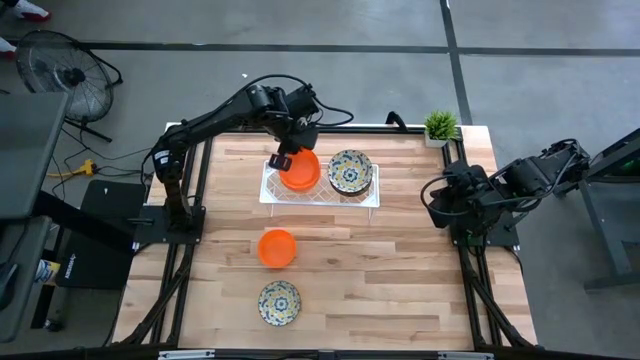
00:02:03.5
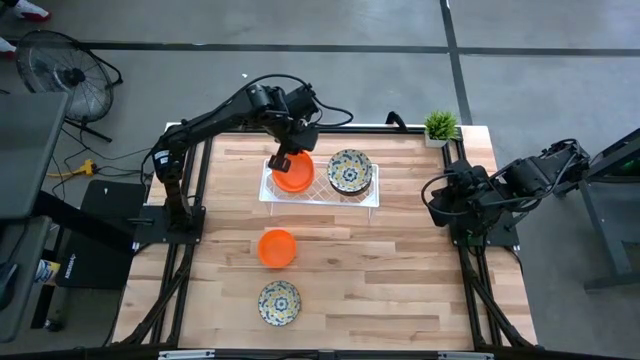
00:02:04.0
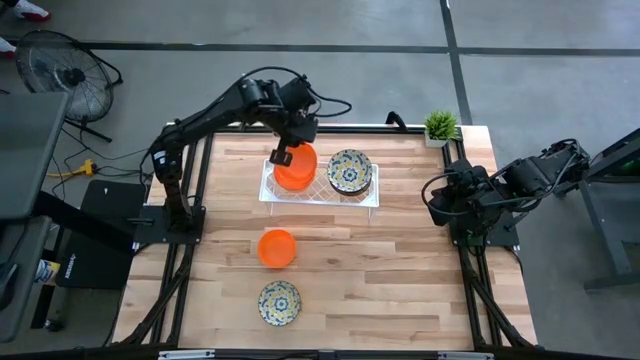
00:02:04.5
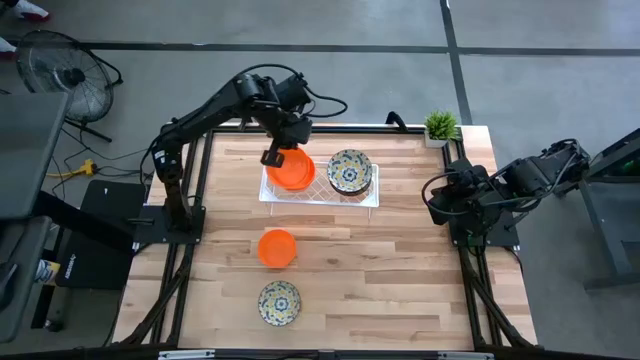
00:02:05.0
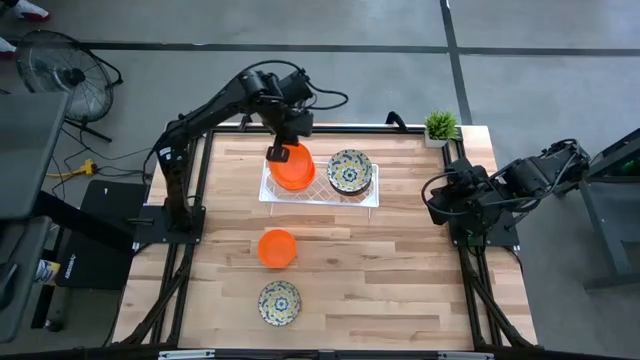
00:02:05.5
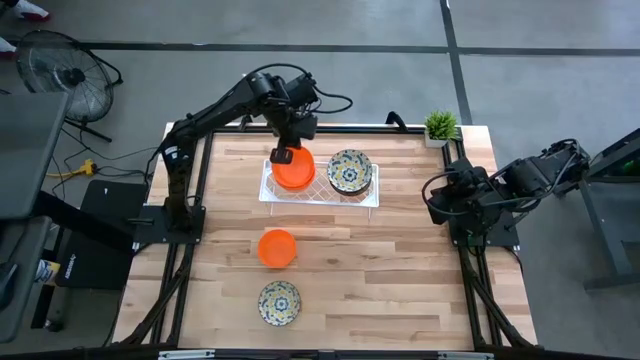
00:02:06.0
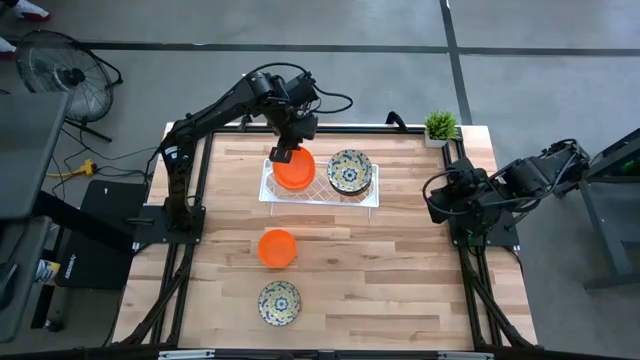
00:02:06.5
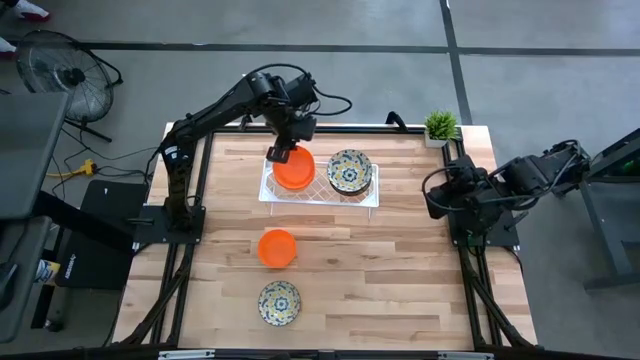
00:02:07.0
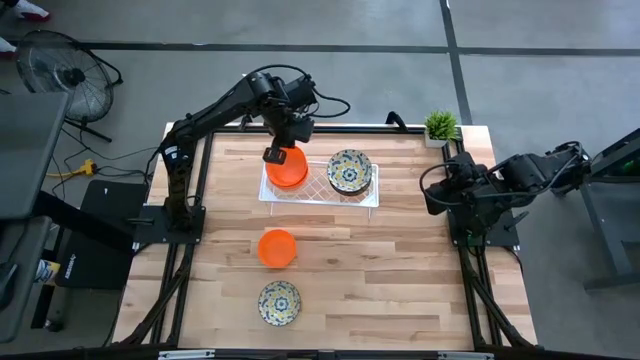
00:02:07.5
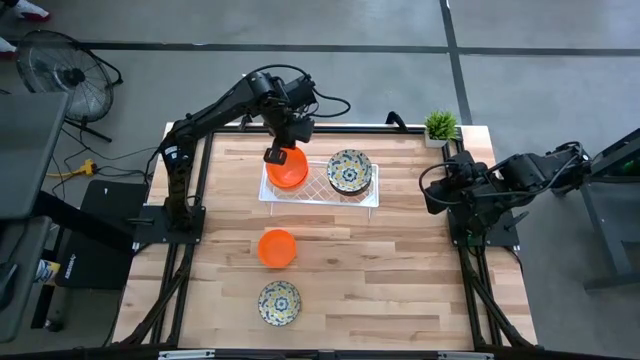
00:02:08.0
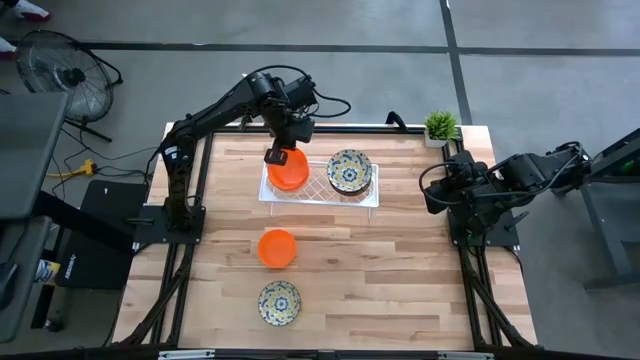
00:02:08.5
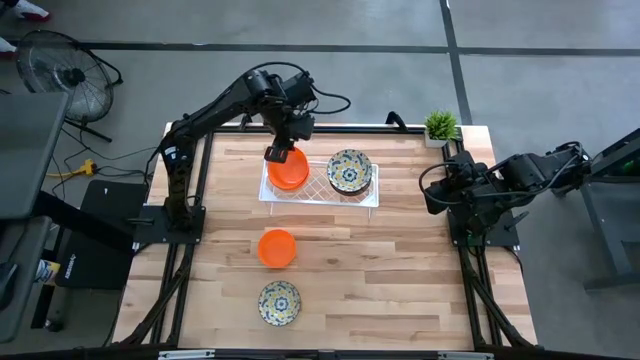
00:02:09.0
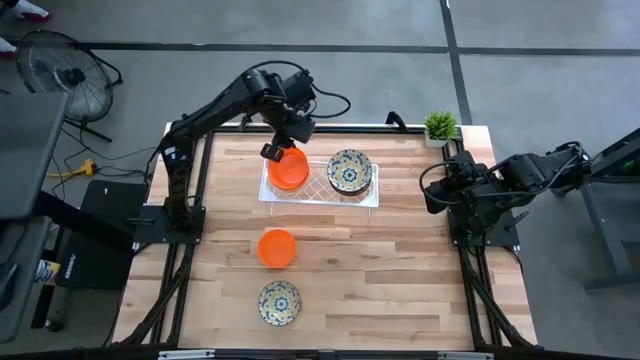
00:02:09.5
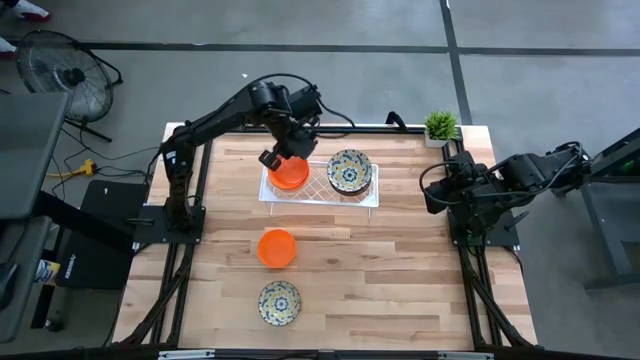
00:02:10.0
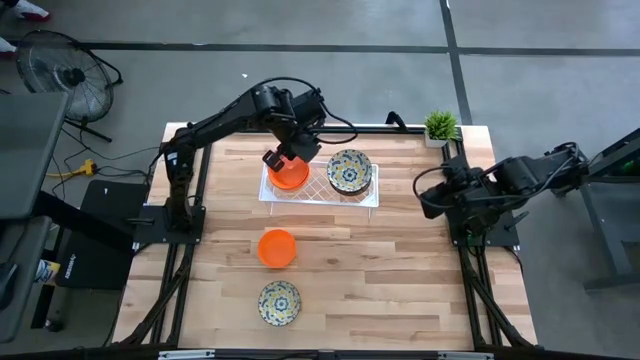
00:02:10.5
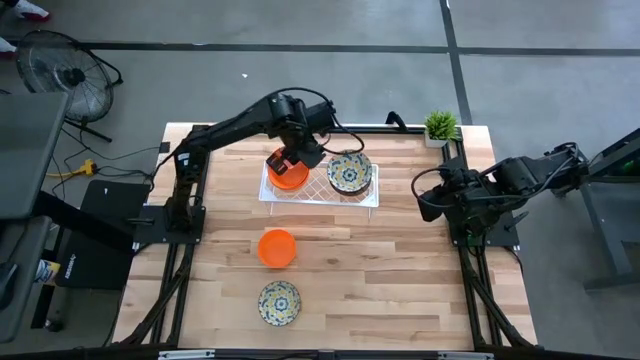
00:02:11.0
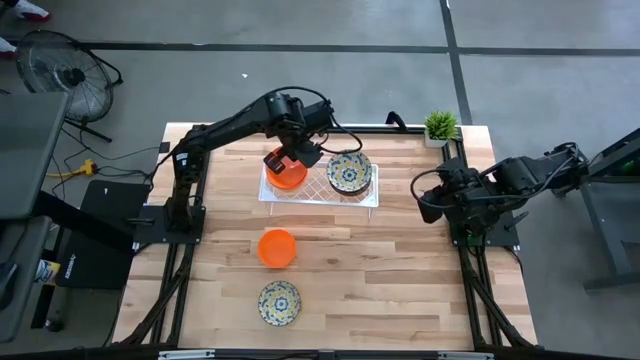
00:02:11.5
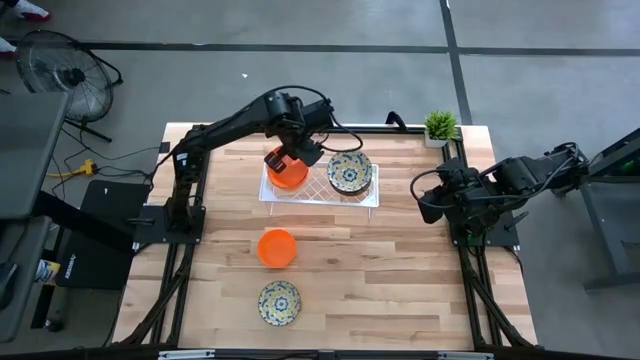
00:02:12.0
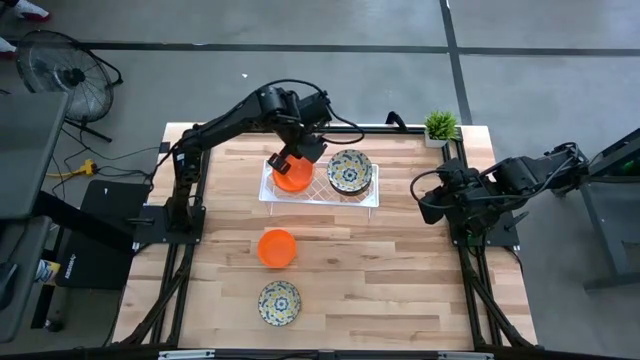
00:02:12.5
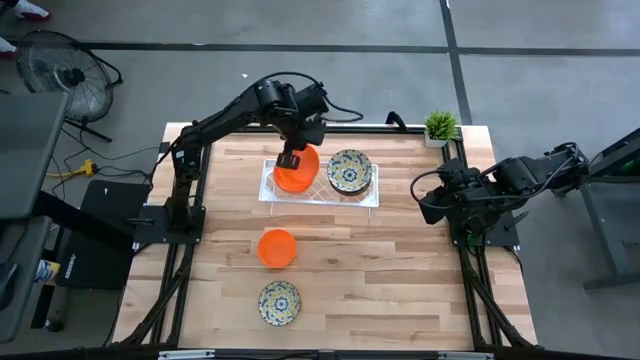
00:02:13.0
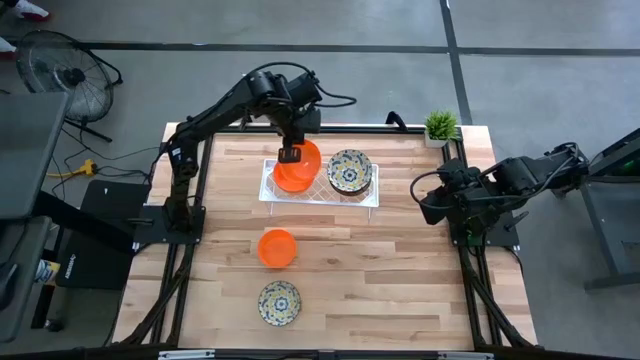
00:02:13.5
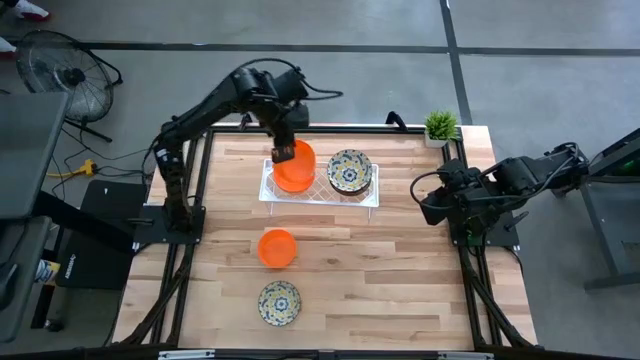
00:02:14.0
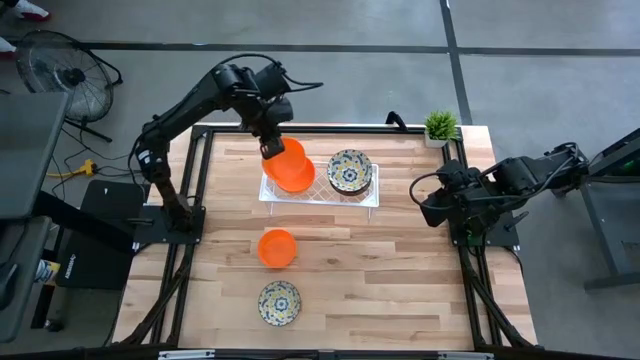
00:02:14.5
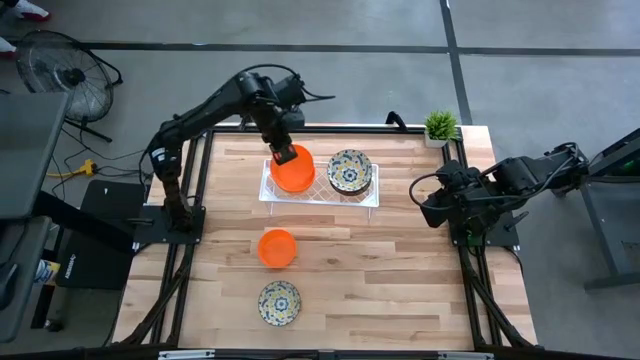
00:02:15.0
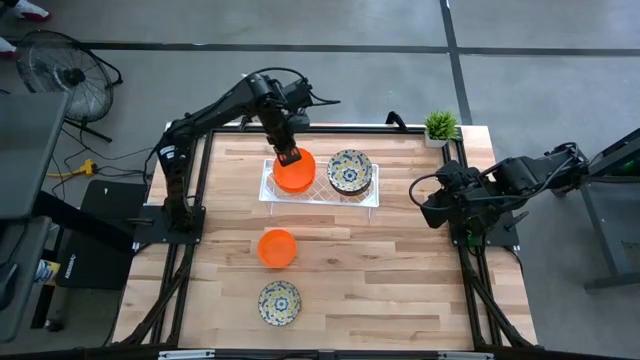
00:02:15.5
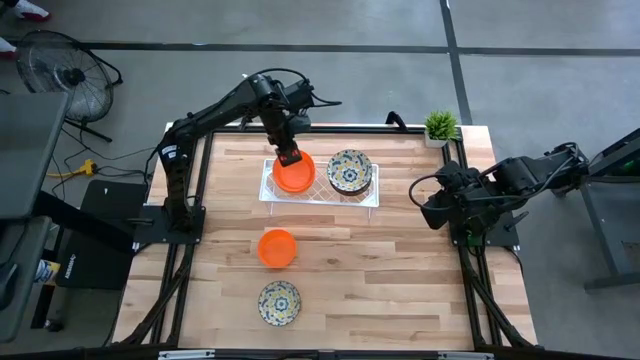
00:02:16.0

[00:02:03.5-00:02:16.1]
Task: Pick & Place Mini bowls
Stack the orange bowl on top of the other orange bowls on the shelf

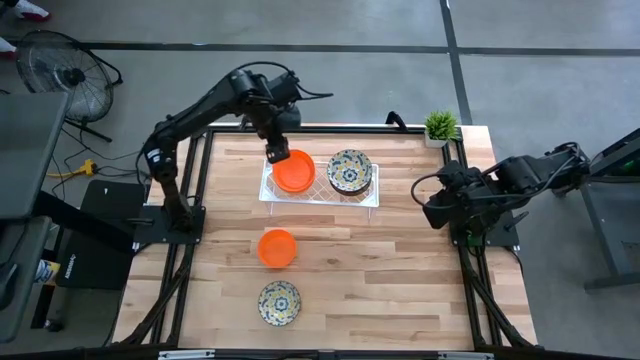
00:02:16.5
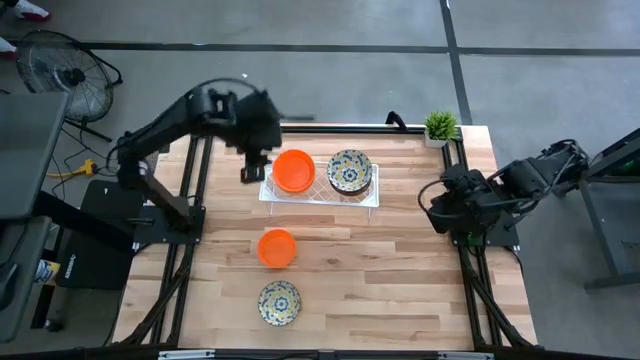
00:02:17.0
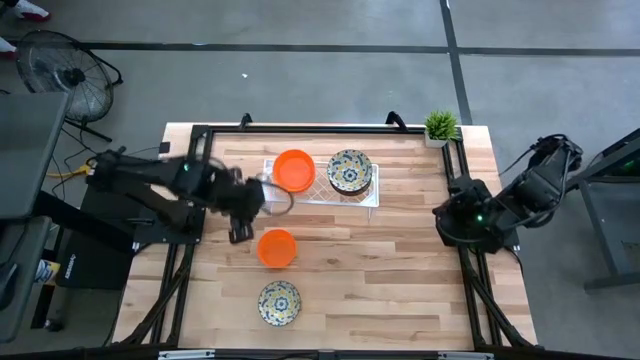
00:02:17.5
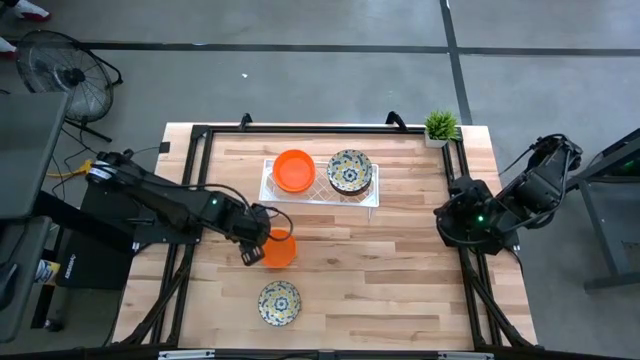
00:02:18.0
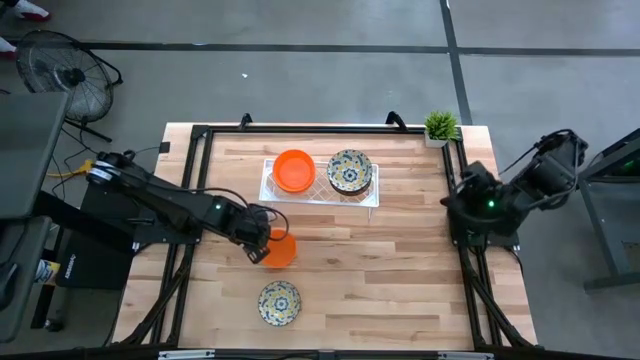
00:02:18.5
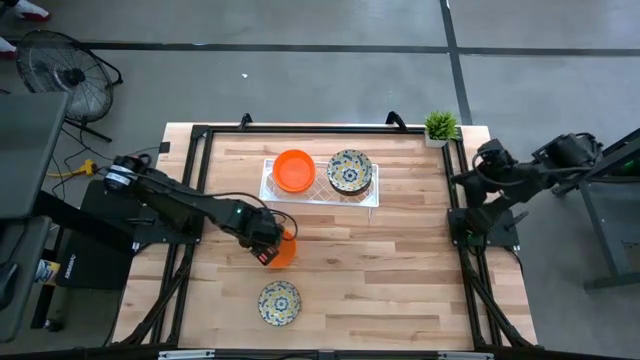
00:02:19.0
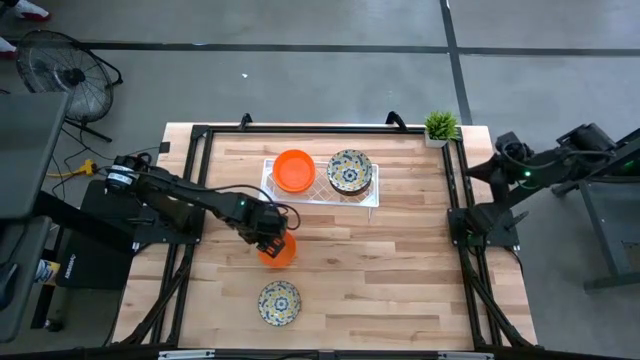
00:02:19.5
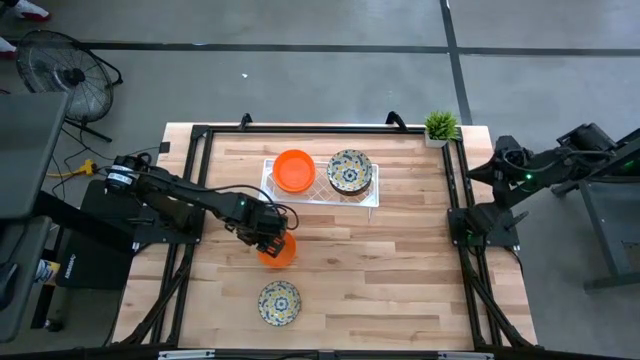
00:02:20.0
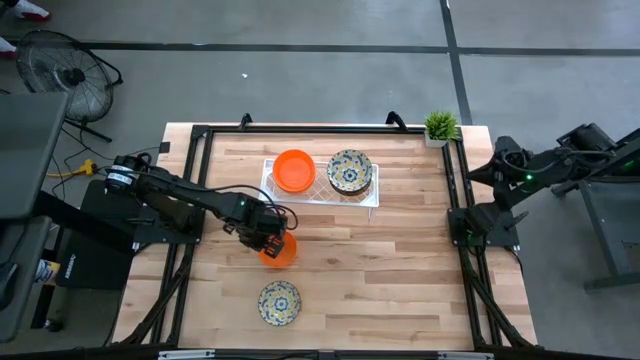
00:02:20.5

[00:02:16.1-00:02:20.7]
Stack the orange bowl on top of the other orange bowls on the shelf

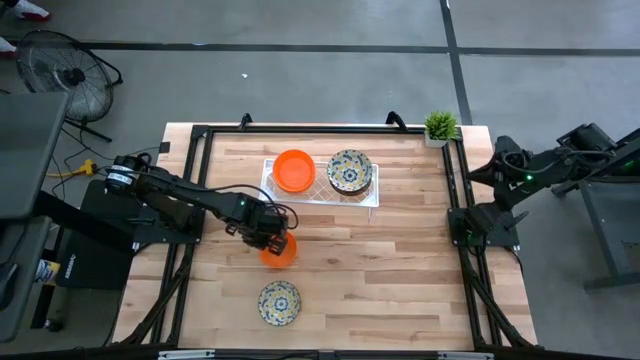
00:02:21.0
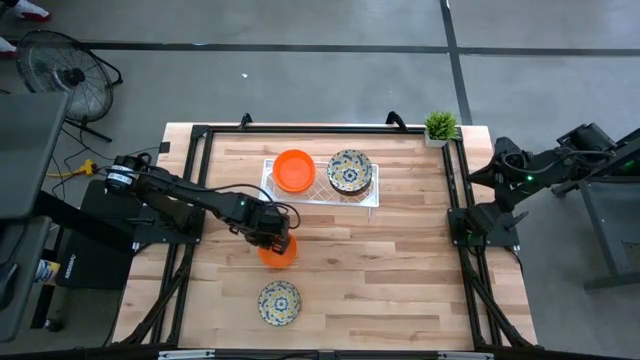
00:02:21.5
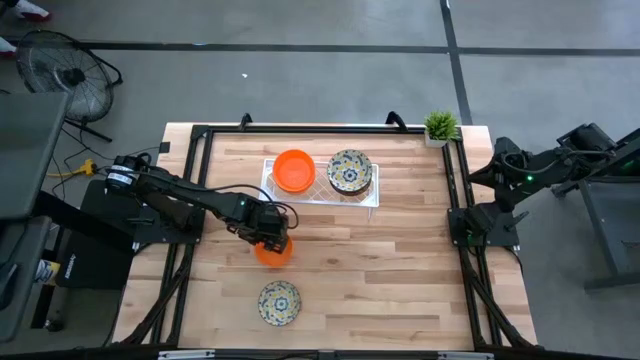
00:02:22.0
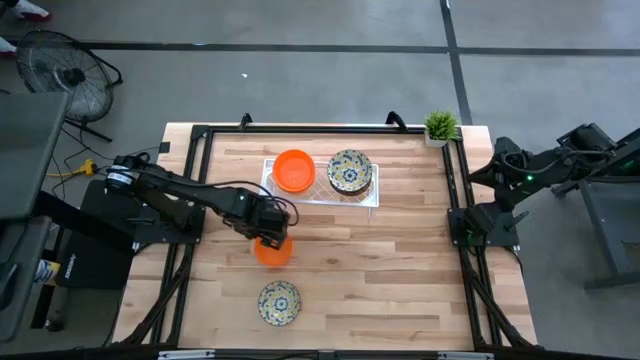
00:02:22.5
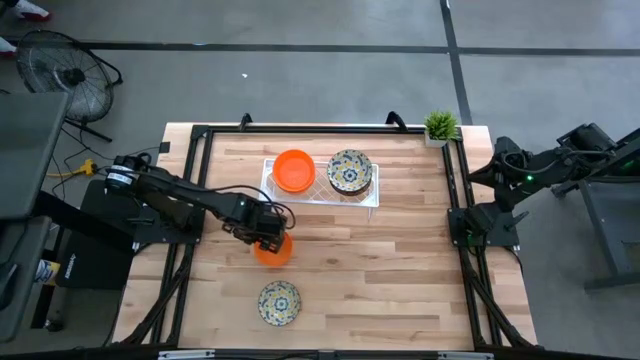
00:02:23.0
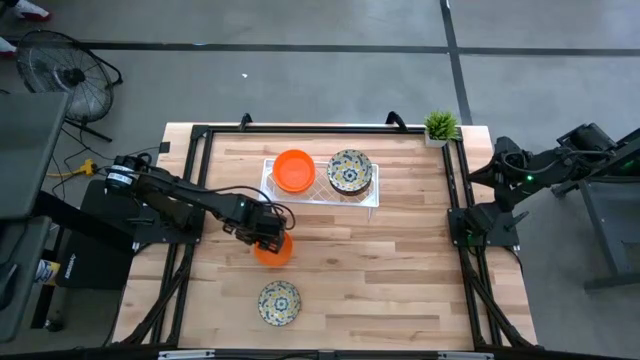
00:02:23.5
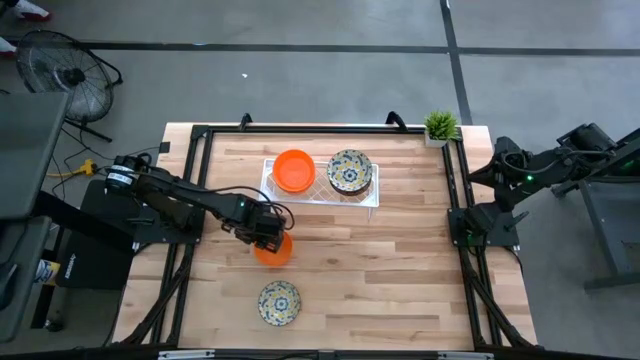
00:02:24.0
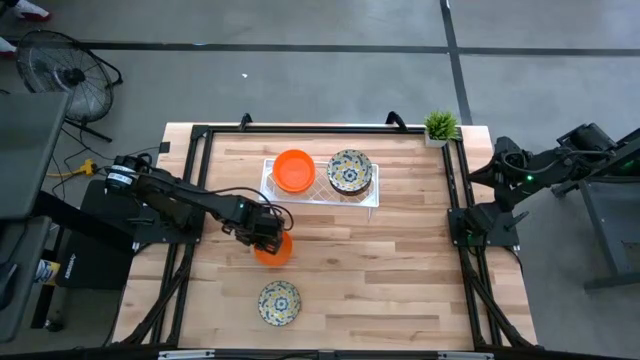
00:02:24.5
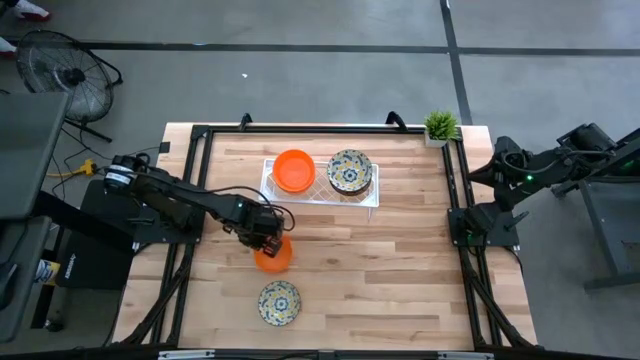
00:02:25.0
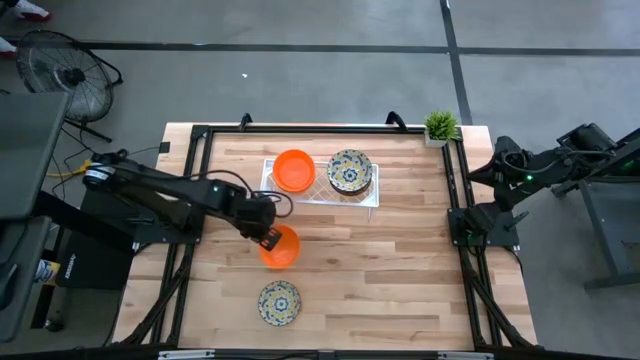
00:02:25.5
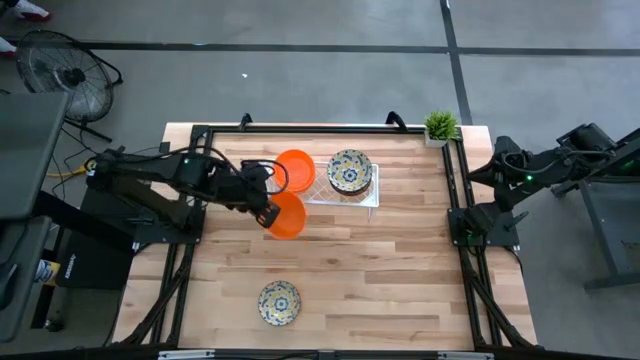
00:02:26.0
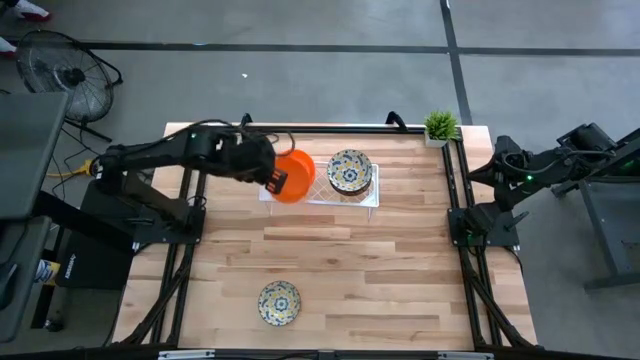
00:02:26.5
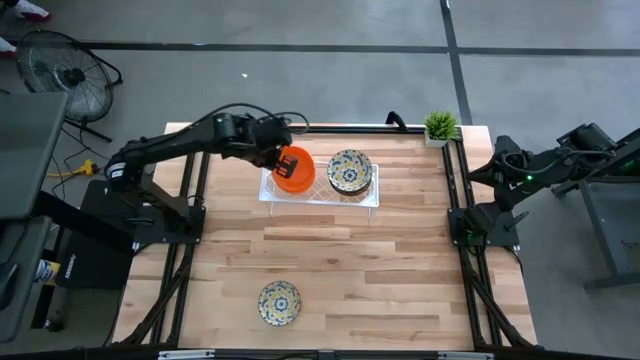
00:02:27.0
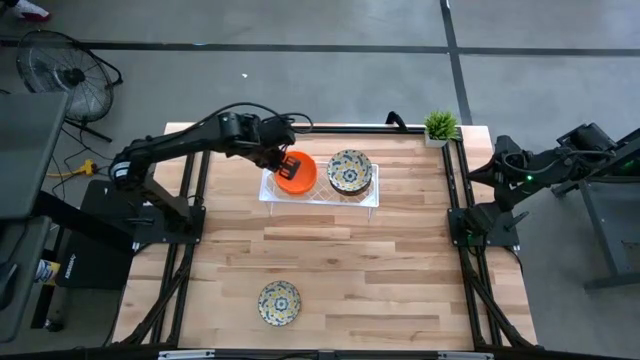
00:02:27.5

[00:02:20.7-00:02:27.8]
Stack the orange bowl on top of the other orange bowls on the shelf
